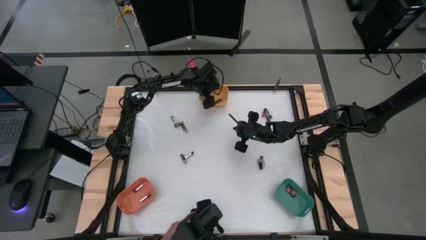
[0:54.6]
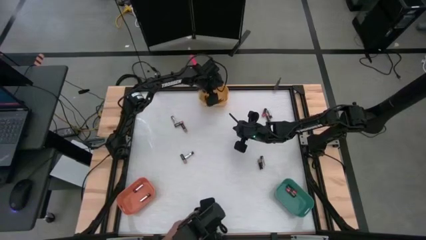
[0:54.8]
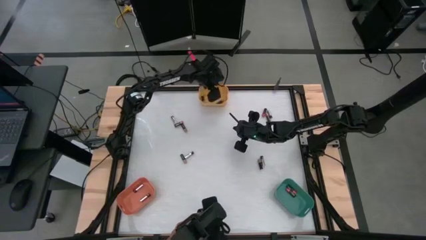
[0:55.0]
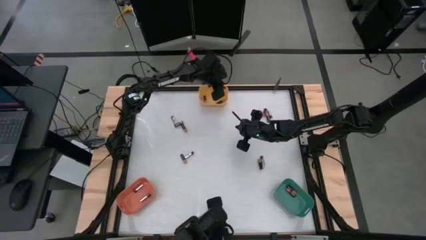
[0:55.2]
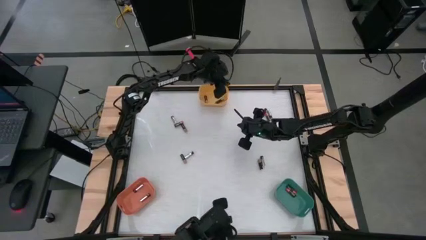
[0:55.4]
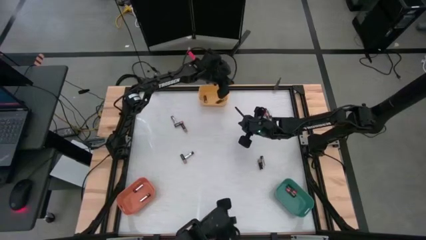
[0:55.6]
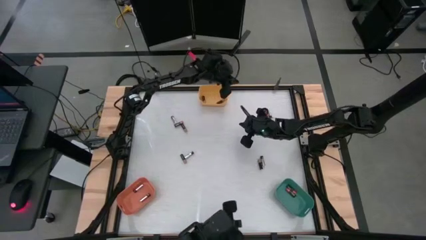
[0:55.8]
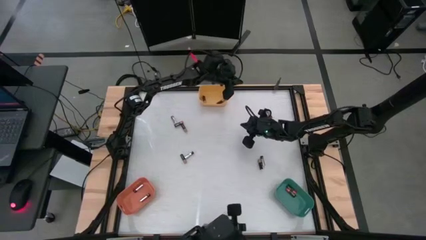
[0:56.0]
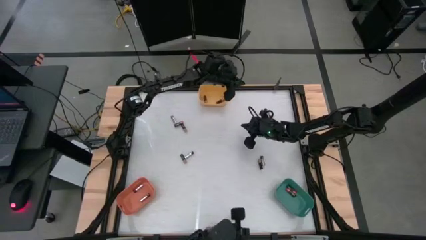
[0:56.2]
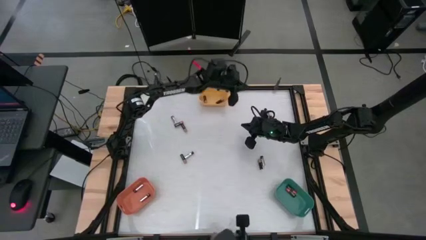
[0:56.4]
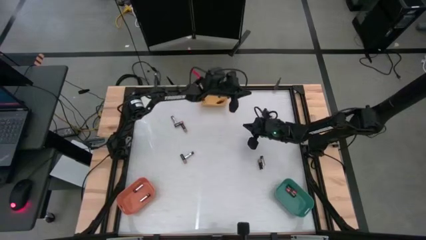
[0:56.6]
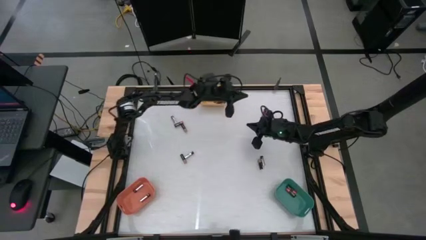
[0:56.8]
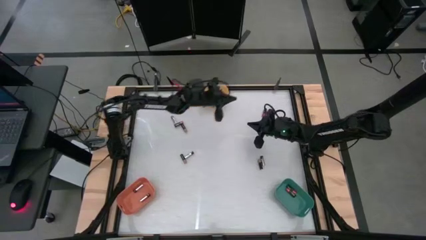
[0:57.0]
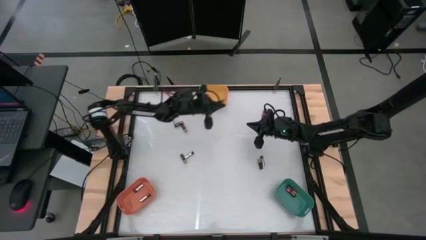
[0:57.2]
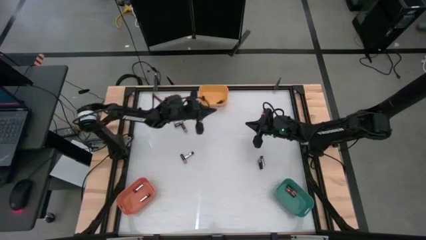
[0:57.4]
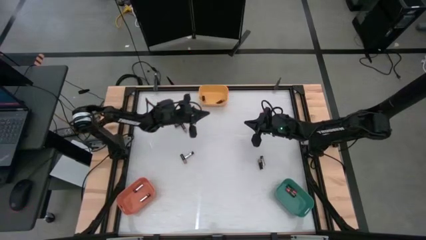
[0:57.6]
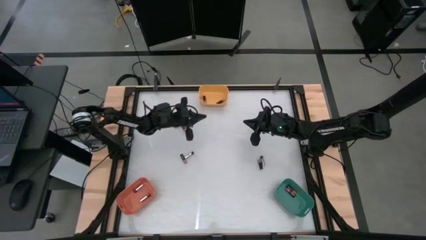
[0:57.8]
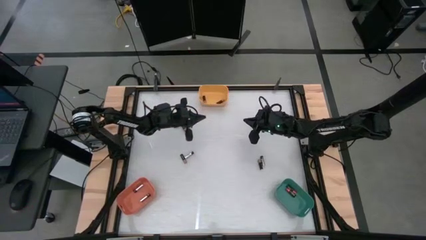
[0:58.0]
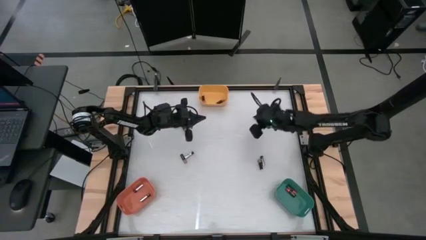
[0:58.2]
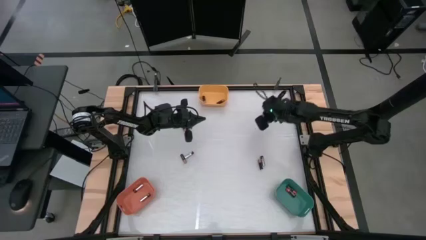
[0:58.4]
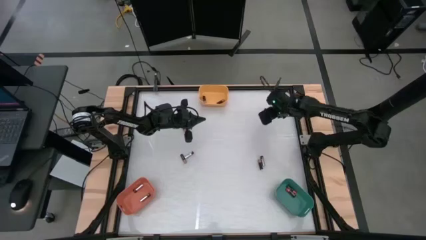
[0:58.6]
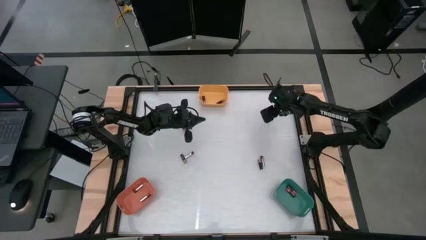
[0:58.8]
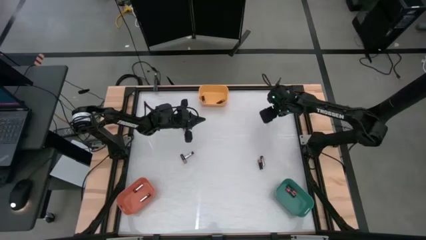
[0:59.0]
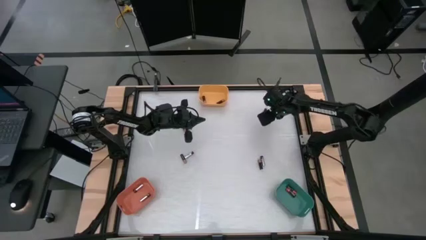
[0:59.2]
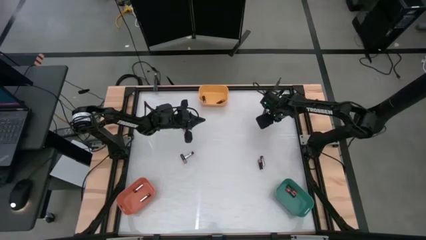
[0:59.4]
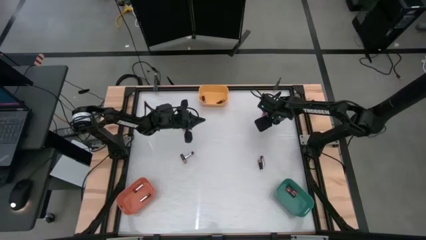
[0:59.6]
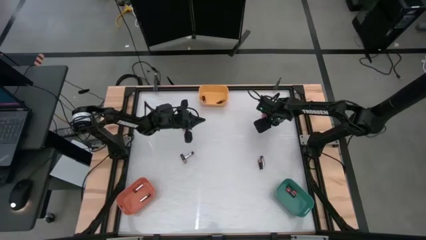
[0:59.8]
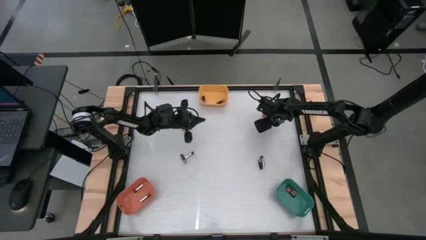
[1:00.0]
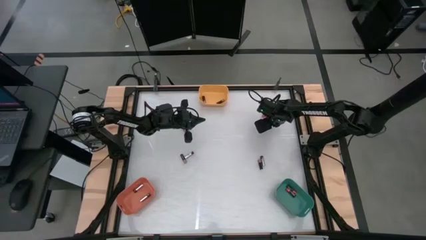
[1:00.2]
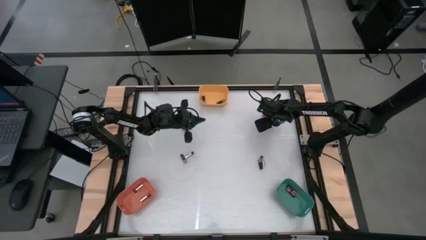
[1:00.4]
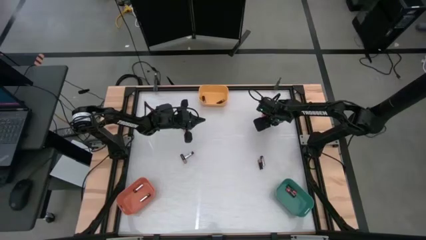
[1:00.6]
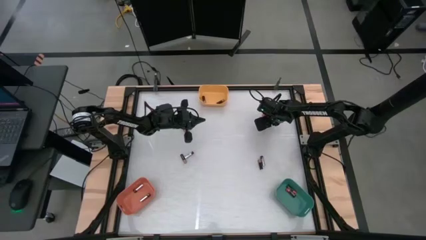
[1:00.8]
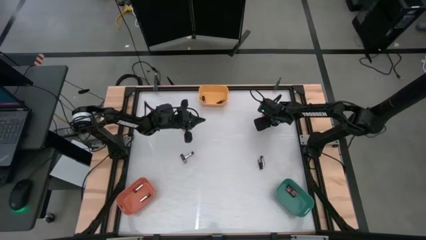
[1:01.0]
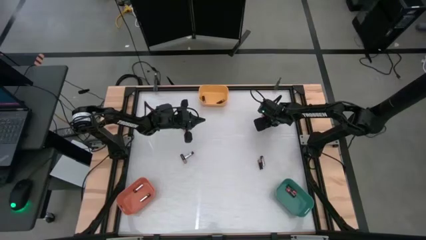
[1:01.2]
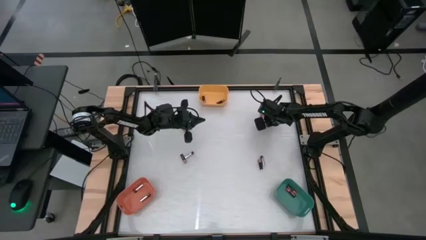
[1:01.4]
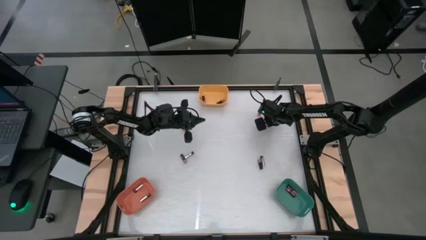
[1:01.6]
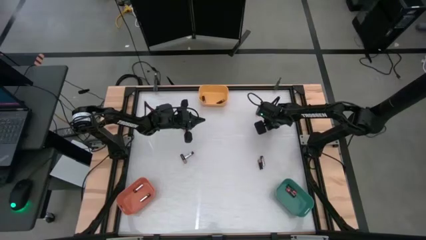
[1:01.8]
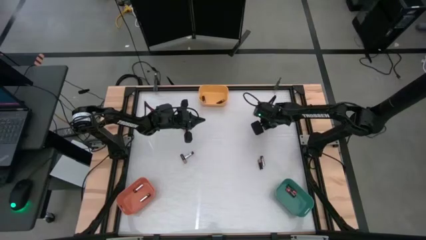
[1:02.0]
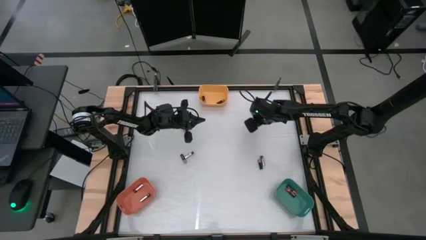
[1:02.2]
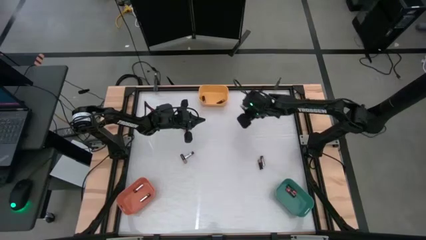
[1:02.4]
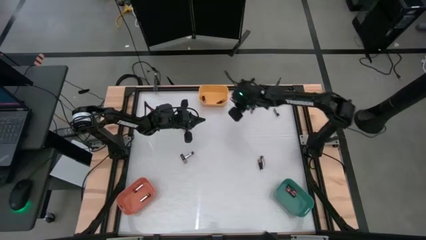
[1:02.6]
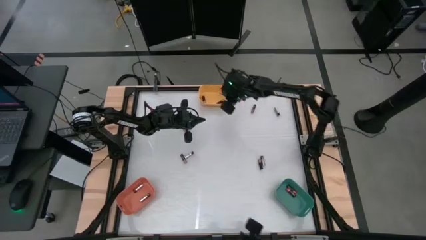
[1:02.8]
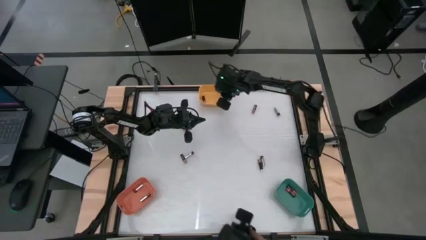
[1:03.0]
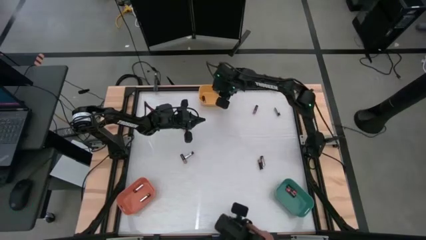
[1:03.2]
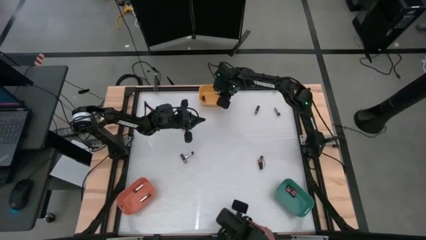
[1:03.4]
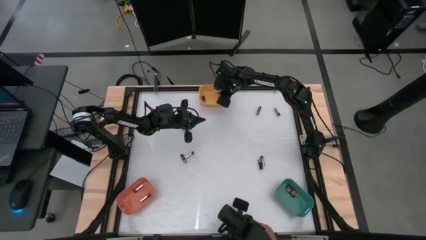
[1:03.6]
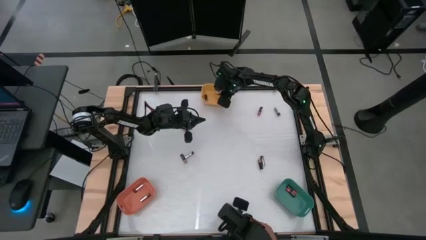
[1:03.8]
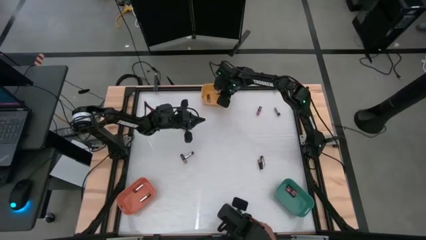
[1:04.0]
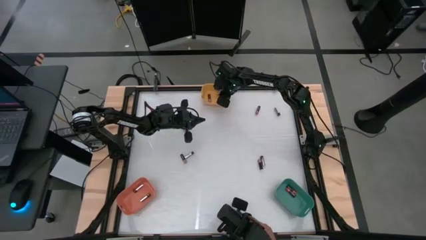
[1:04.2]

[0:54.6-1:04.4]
Task: Sort batteries
Put the black-brown battery into the yellow bin

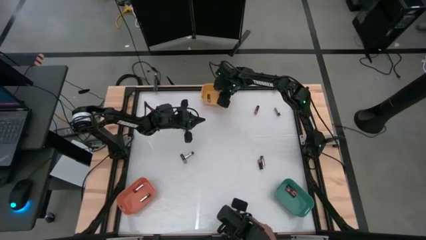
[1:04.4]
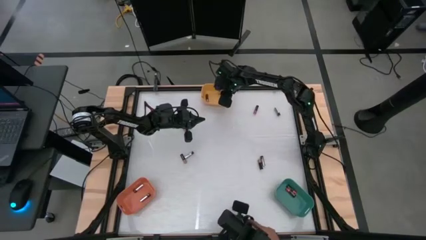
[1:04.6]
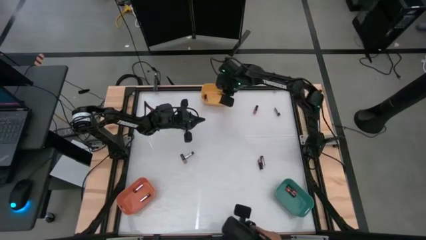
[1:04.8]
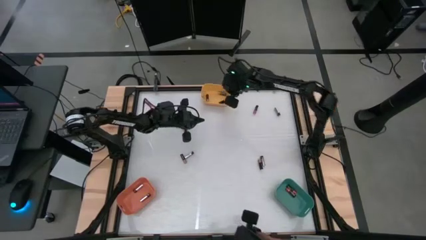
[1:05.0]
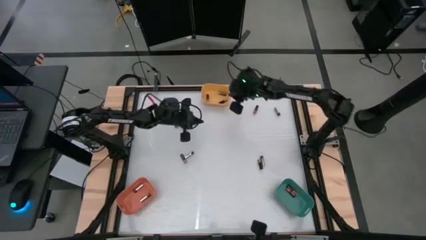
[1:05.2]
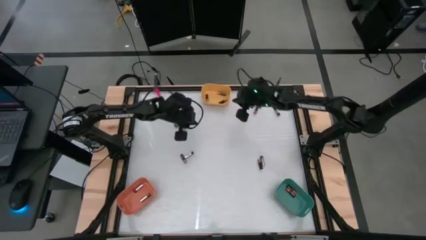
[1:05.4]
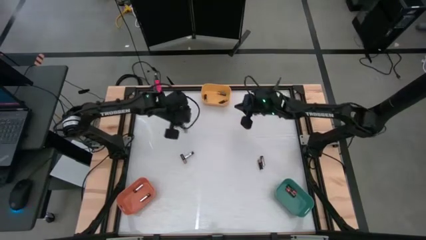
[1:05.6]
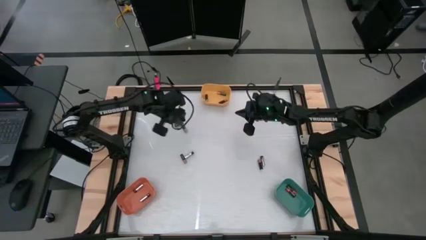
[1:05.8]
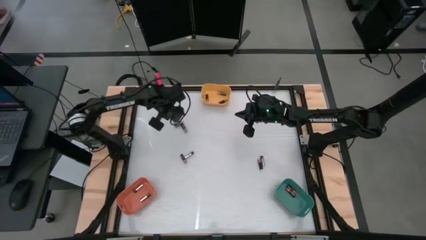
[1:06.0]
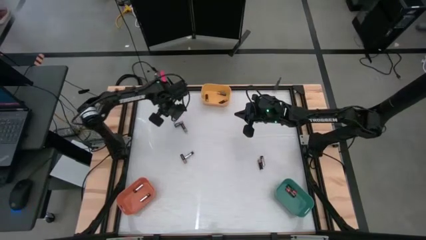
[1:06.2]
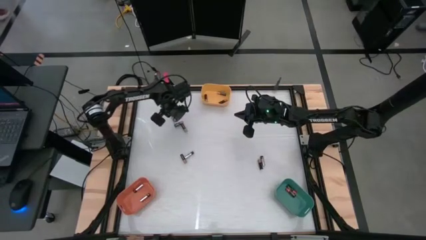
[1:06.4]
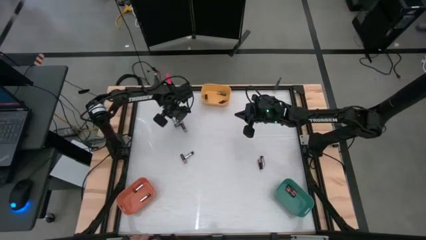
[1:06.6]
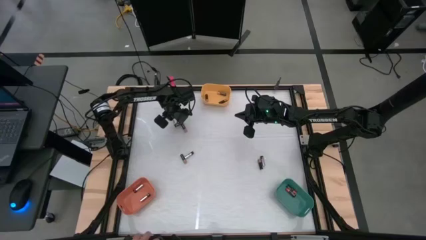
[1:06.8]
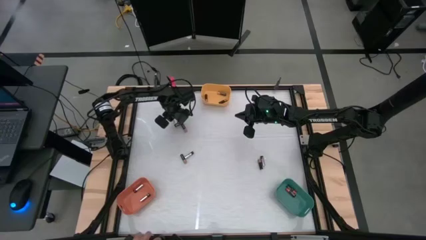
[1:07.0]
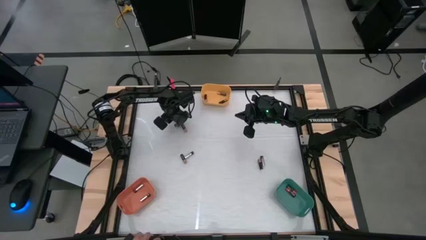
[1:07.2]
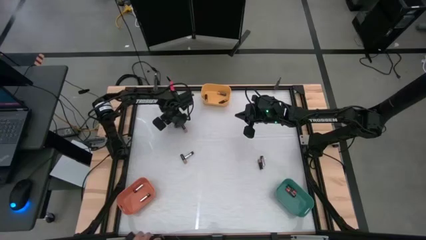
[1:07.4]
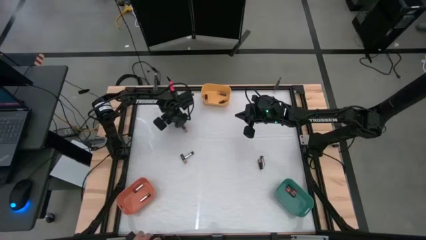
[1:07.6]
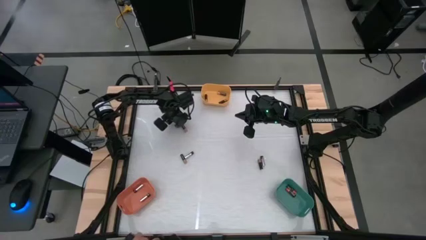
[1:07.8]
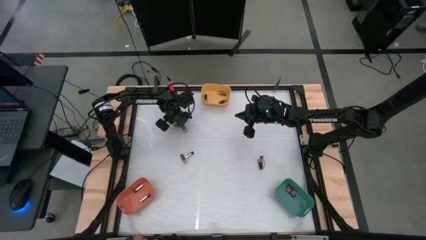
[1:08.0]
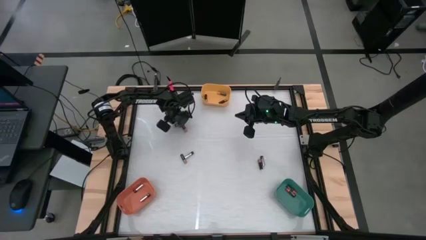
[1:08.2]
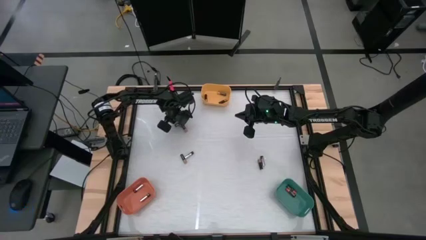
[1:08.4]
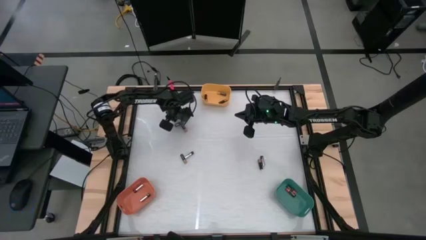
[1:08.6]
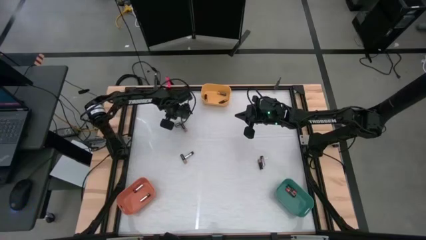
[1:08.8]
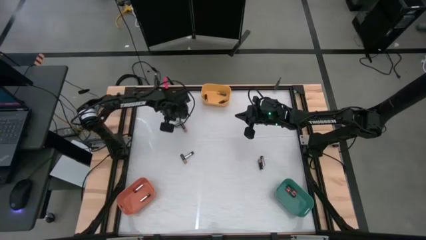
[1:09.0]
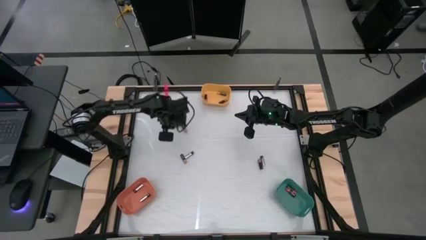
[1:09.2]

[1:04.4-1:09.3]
Put the silver battery into the orange bin
